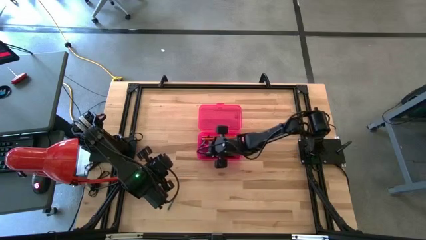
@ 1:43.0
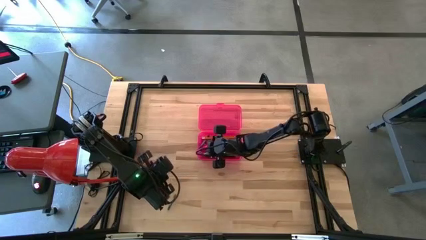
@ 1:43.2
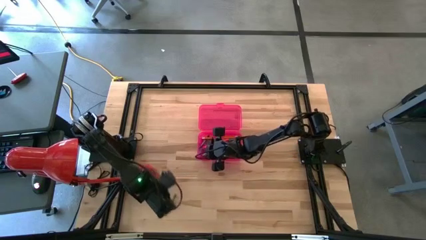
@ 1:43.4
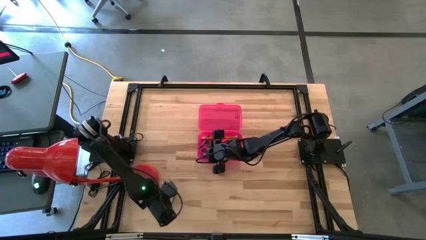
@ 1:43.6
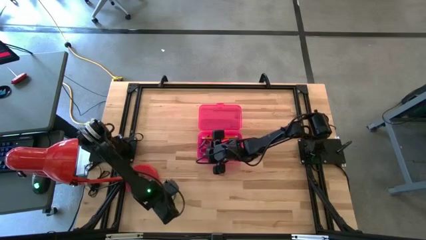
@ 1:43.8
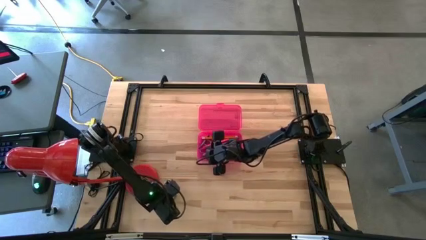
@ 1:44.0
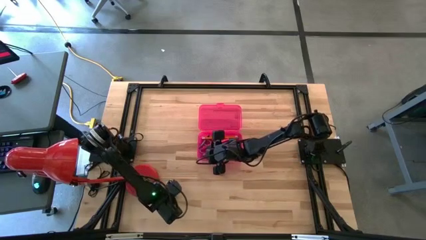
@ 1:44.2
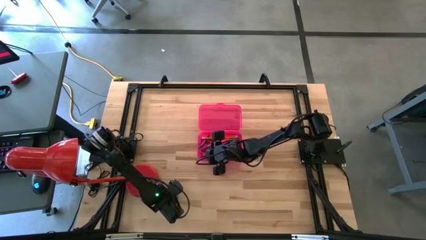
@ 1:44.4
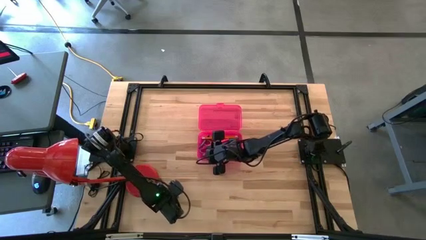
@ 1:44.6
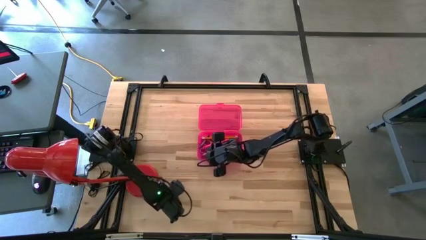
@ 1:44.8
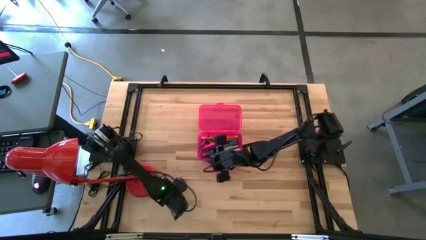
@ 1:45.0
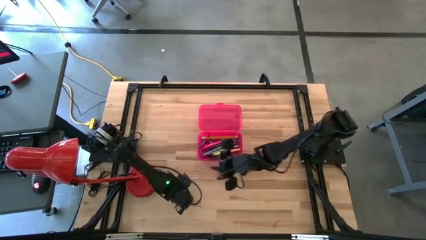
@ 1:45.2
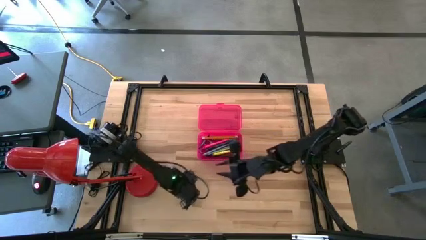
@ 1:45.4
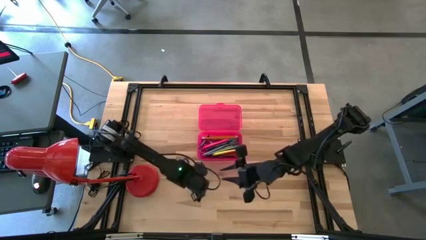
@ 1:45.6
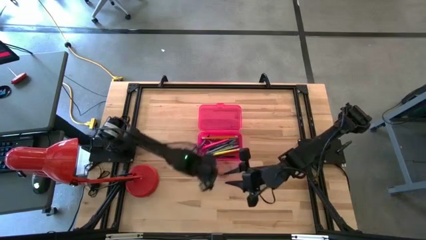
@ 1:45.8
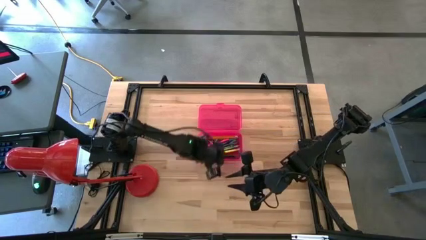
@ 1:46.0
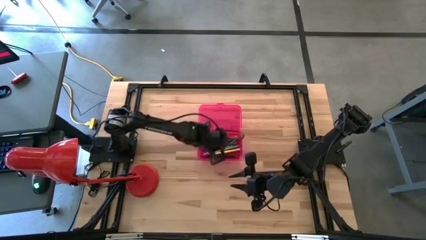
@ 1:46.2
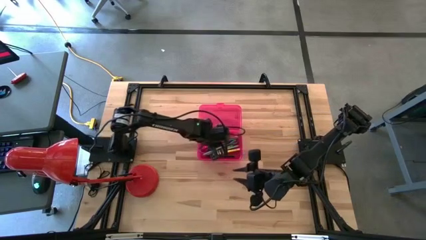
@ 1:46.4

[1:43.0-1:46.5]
Task: Pick & place school supplies into a supply box
Put the dark green crayon into the pink supply box

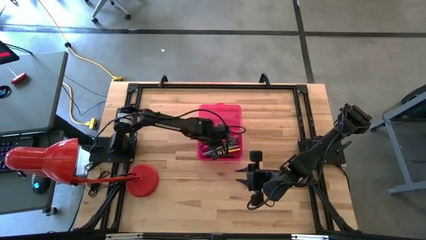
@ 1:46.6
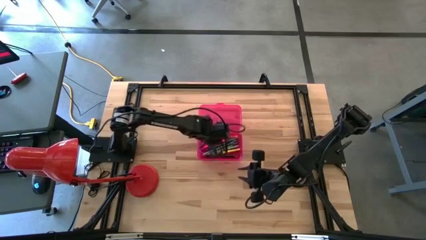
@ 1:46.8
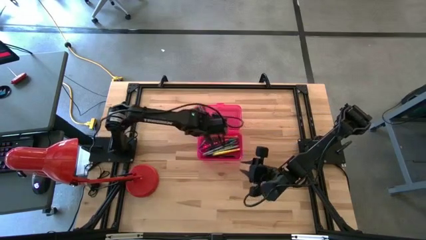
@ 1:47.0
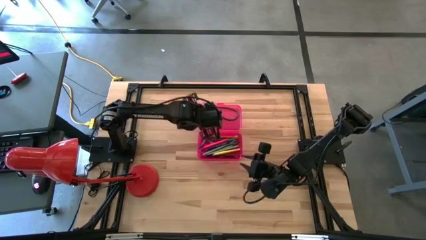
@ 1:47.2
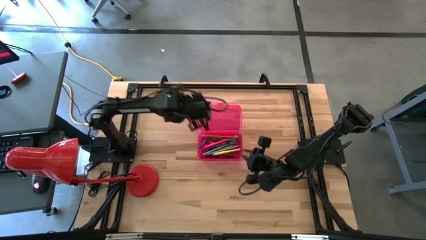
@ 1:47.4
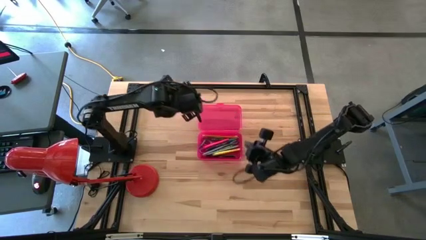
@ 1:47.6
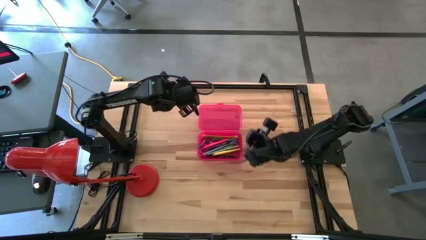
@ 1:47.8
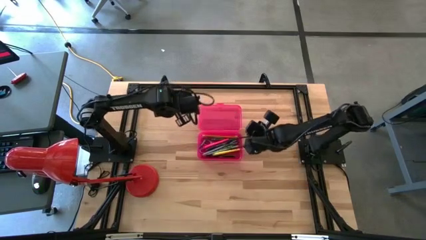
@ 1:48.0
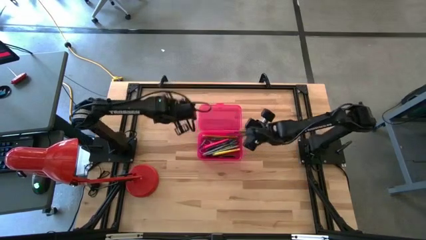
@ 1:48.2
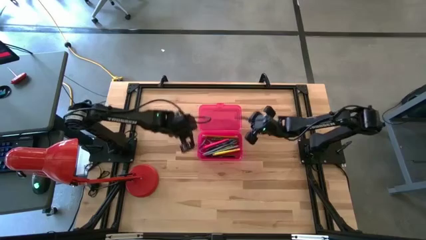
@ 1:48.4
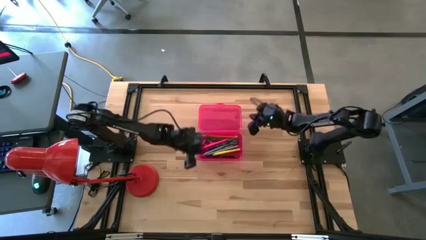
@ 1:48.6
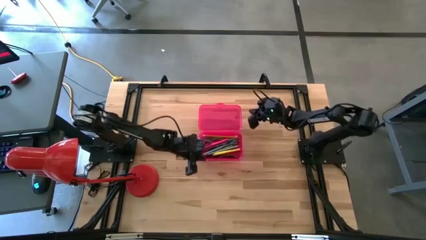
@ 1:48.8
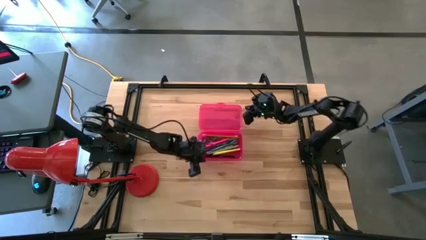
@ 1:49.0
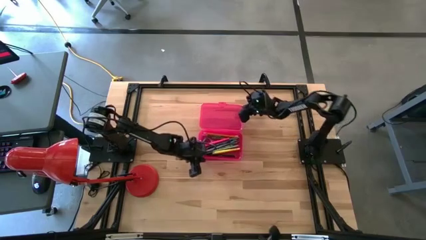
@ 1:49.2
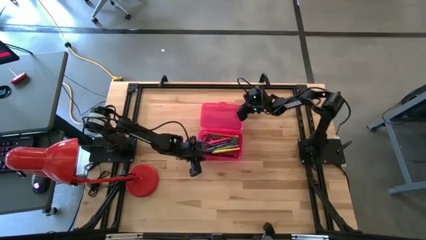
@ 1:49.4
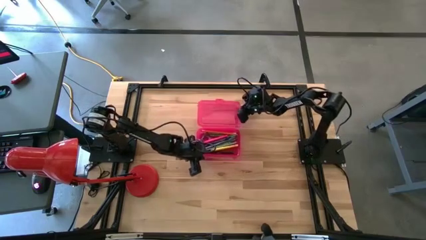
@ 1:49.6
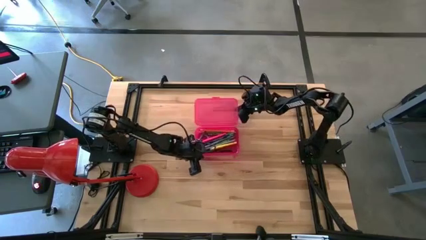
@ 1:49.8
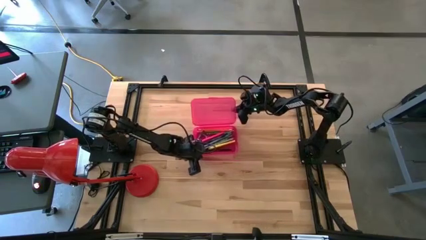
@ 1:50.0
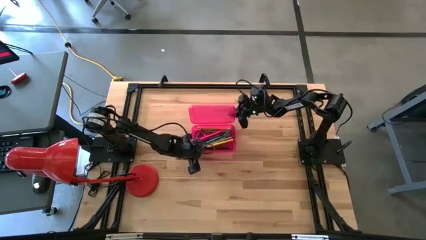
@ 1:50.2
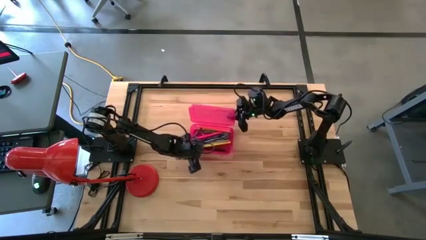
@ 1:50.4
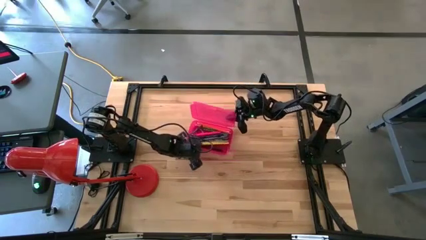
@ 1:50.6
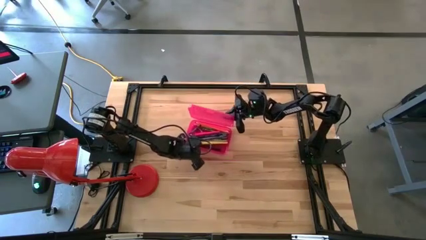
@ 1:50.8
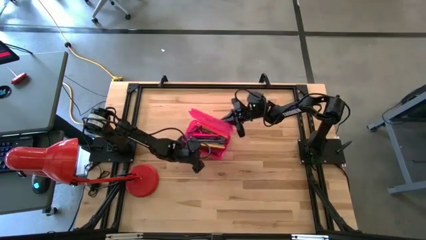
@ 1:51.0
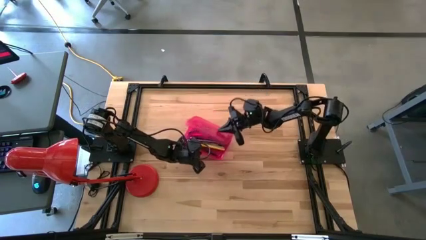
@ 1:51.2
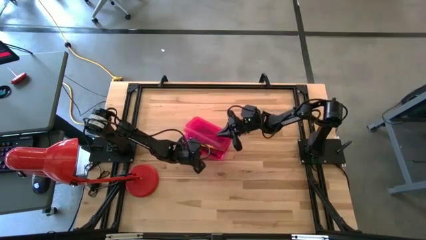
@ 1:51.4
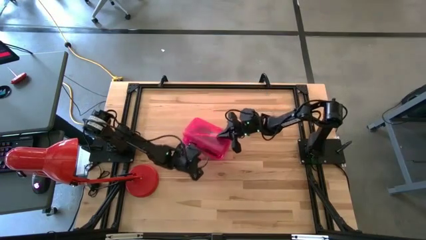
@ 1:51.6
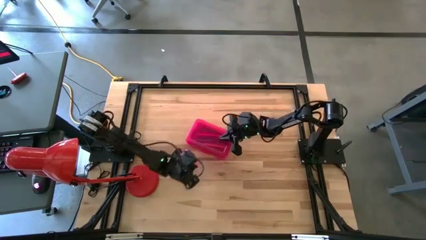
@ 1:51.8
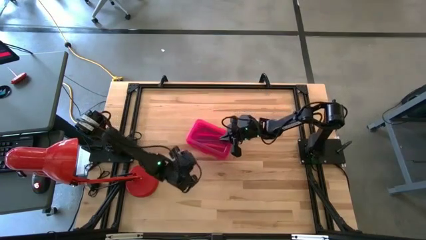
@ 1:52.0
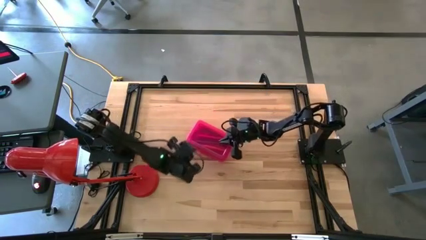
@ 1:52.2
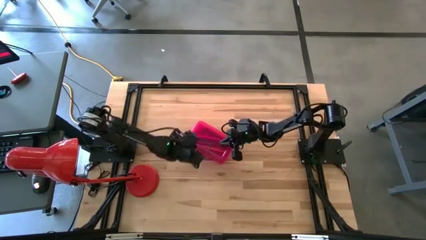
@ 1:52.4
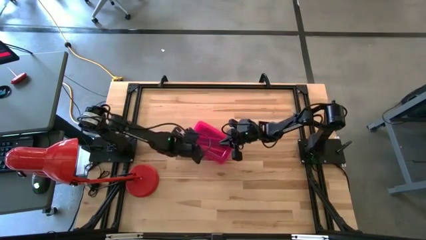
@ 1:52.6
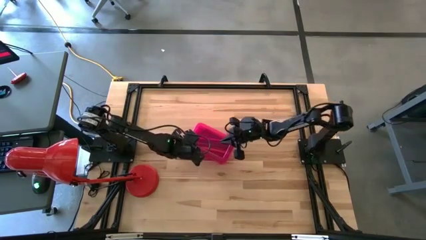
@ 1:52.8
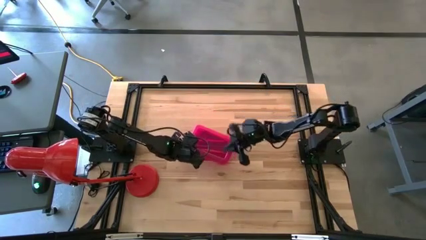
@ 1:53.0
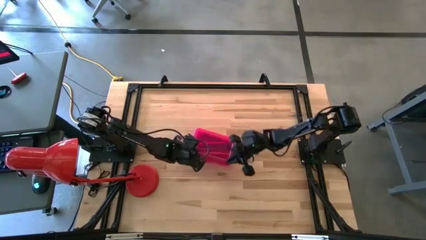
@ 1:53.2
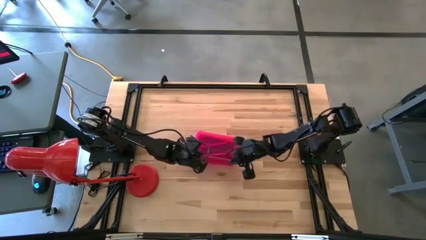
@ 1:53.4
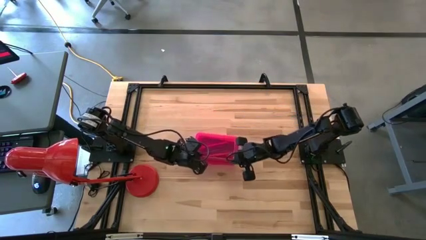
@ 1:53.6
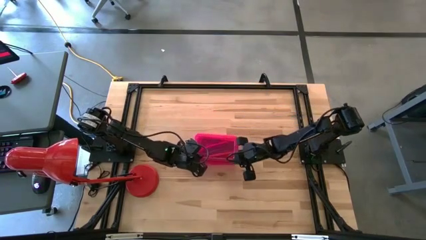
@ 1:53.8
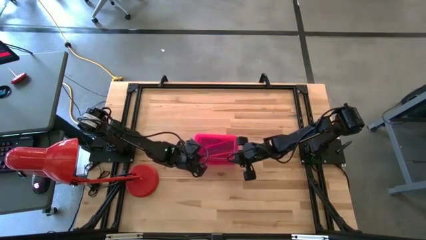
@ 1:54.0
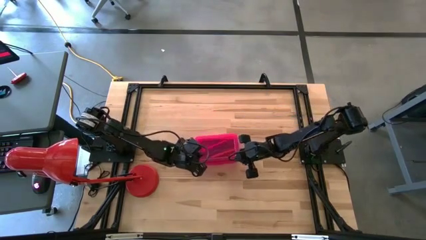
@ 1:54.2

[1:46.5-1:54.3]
Close the pink supply box

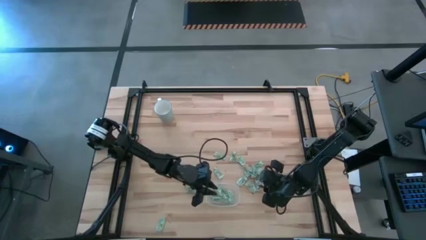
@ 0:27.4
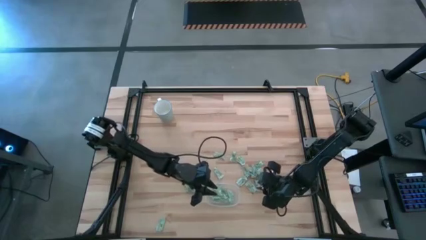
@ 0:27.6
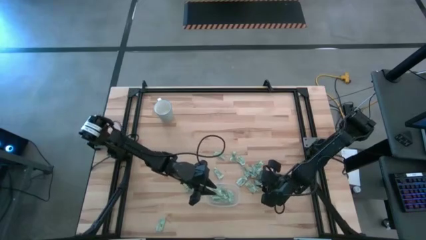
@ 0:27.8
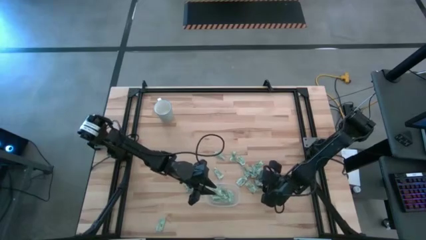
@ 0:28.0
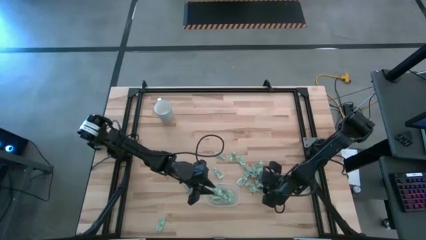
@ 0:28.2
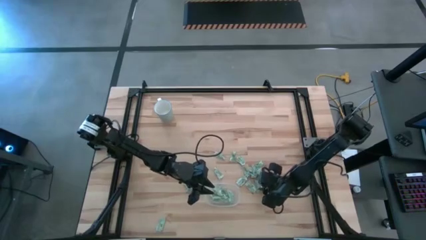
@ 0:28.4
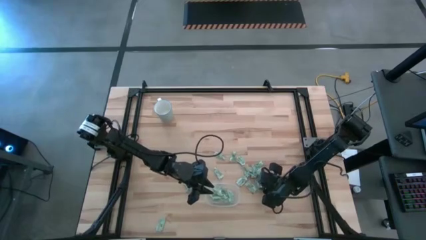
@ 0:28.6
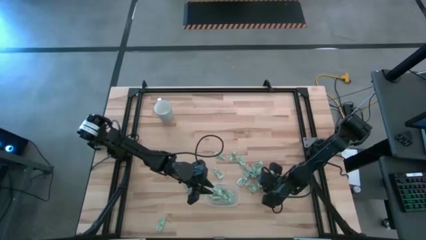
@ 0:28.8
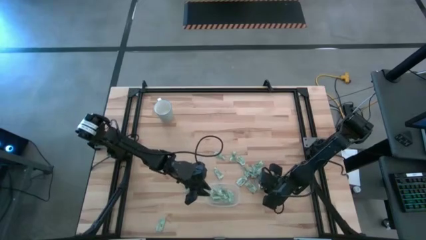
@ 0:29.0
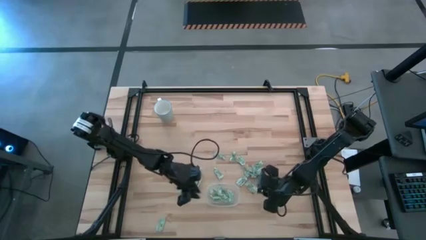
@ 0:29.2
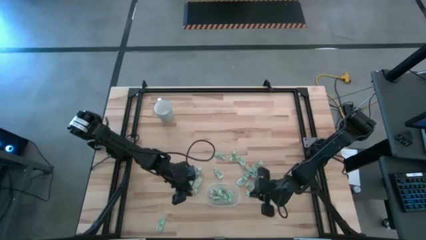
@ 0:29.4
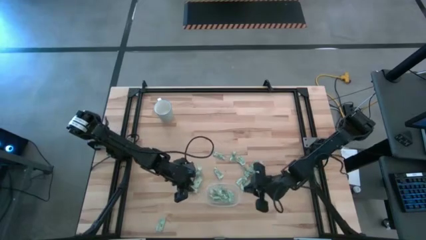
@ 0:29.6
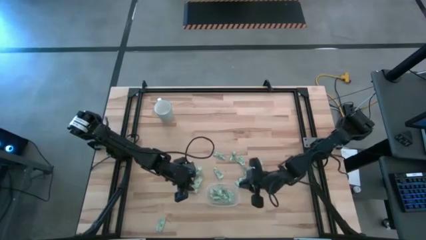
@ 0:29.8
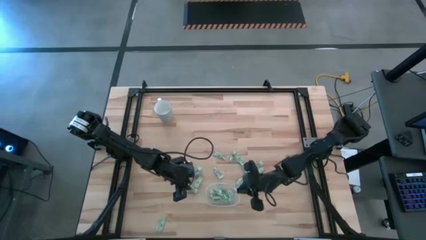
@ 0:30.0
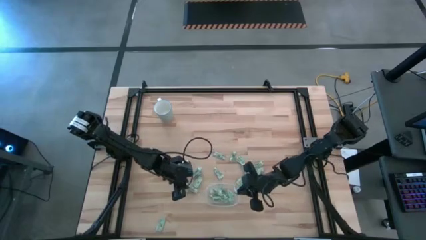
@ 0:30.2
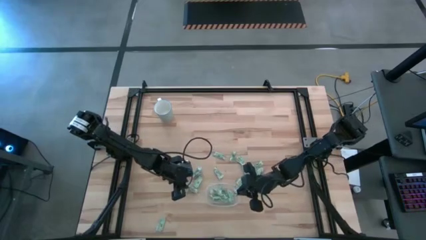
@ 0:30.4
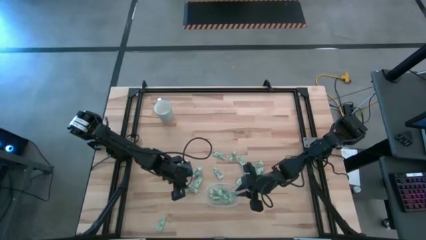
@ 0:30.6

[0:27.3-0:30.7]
Task: Pick and place Stevia / Truvia into bins
Put the stevia packet into the transparent container

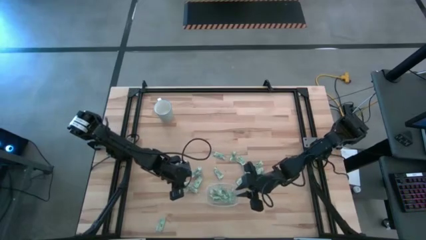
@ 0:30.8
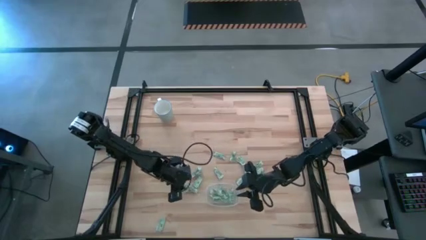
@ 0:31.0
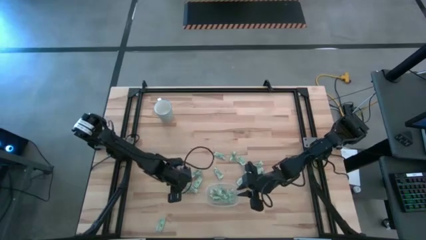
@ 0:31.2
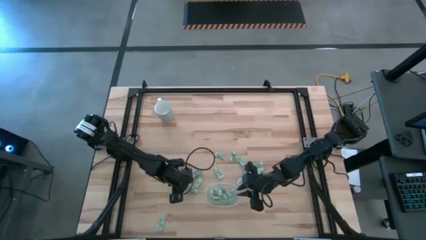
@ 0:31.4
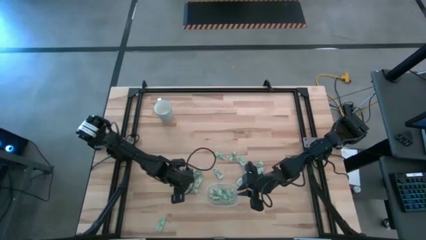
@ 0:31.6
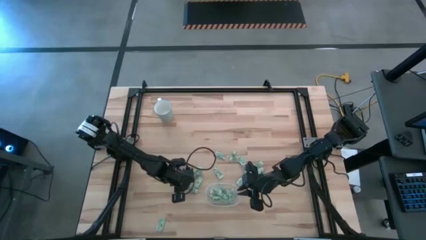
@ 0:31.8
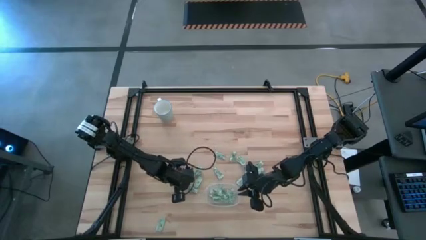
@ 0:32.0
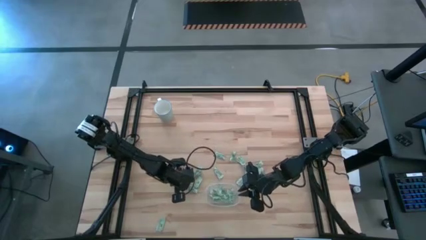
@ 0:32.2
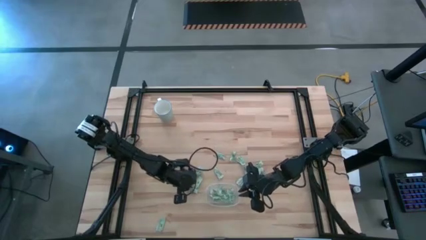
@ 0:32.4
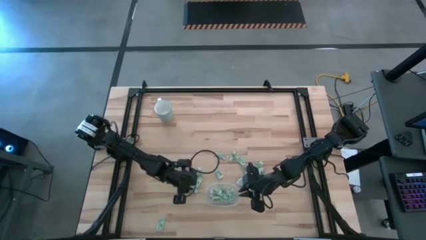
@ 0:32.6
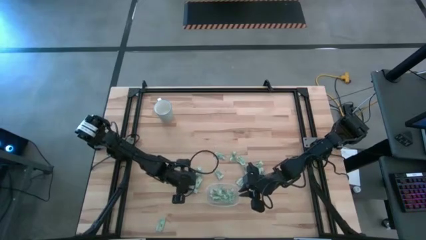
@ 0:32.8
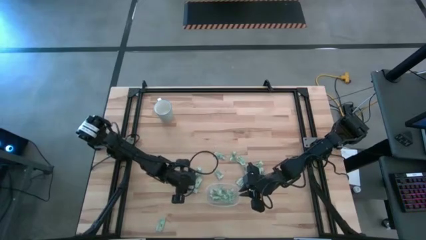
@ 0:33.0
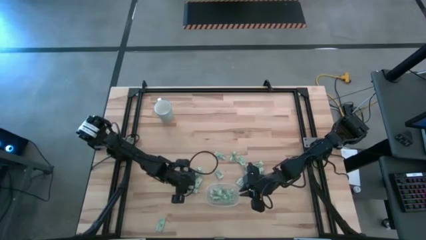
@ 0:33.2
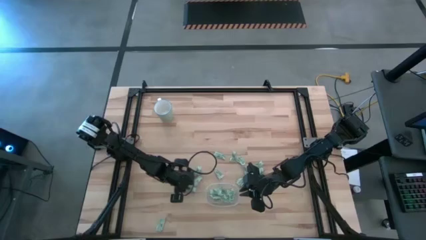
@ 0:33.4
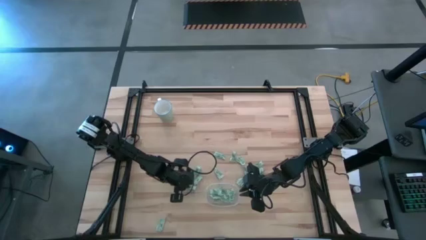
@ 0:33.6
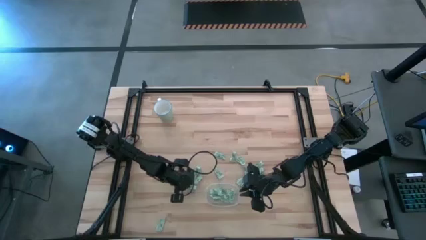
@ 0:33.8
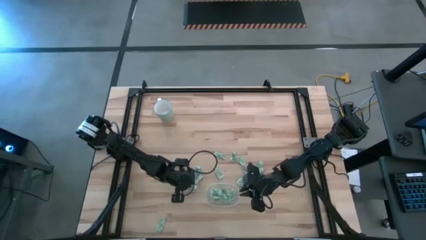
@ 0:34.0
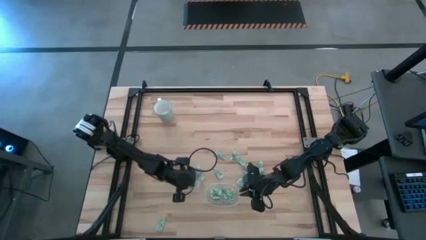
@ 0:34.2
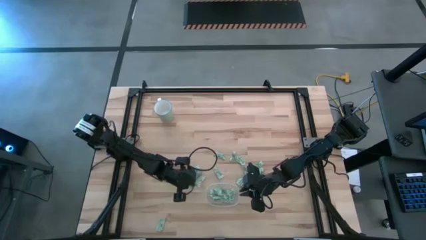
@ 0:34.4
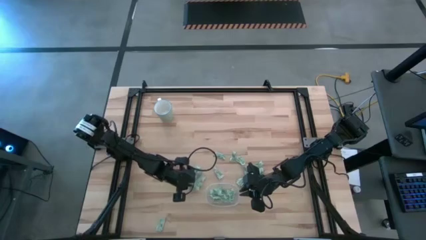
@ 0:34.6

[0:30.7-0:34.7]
Put the stevia packet into the transparent container
